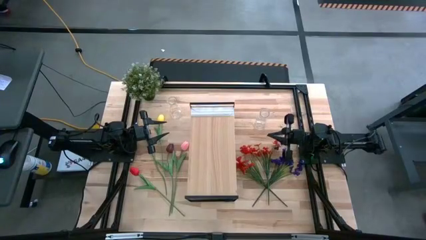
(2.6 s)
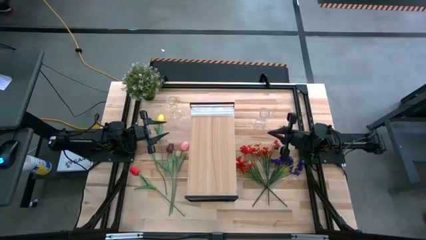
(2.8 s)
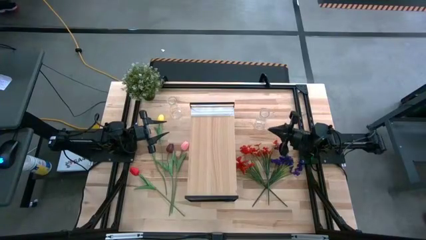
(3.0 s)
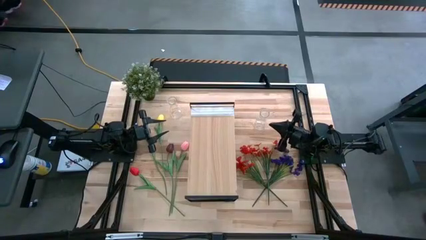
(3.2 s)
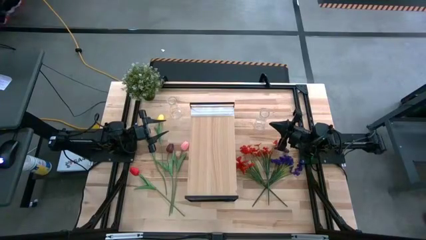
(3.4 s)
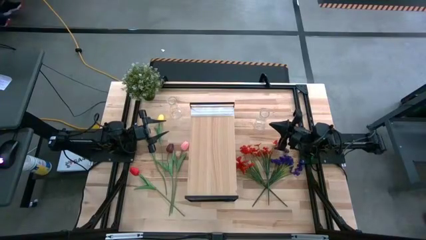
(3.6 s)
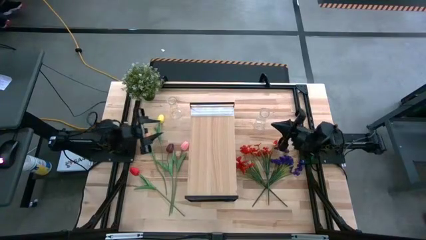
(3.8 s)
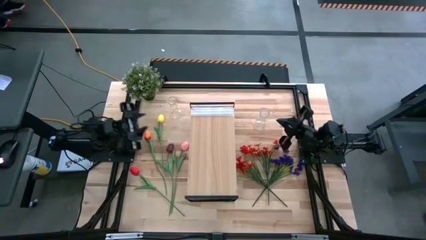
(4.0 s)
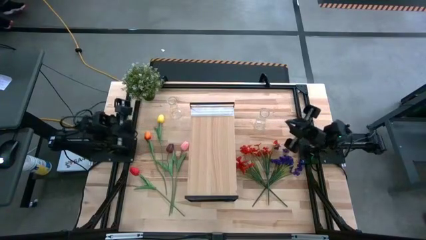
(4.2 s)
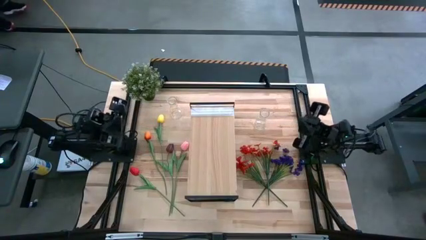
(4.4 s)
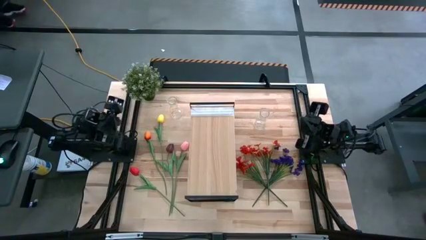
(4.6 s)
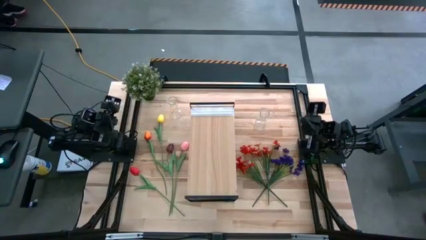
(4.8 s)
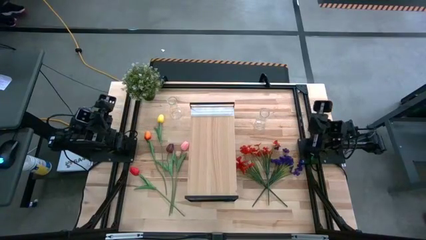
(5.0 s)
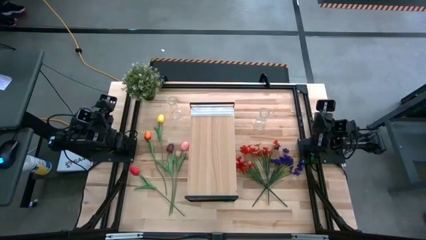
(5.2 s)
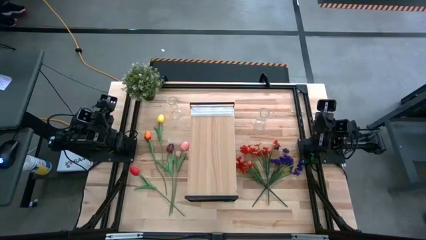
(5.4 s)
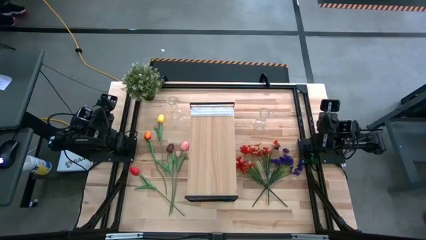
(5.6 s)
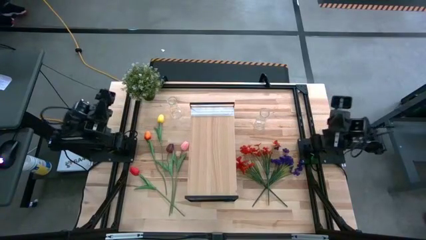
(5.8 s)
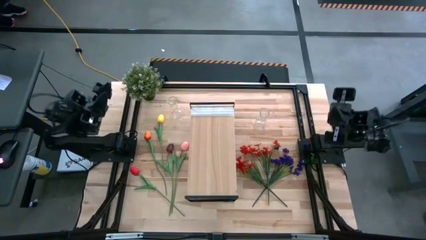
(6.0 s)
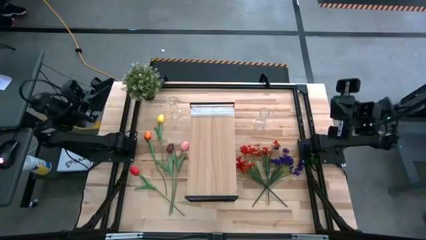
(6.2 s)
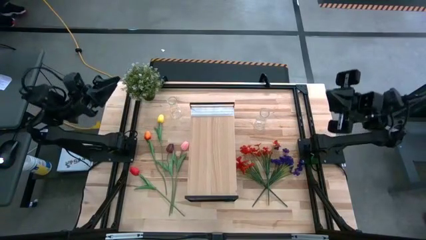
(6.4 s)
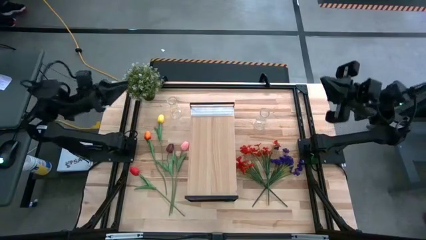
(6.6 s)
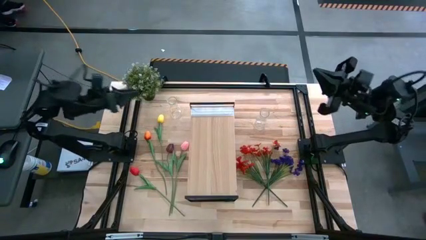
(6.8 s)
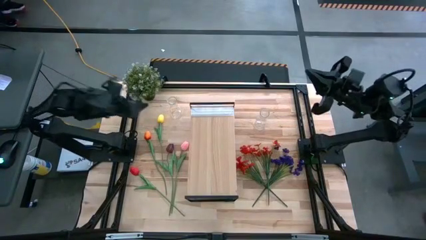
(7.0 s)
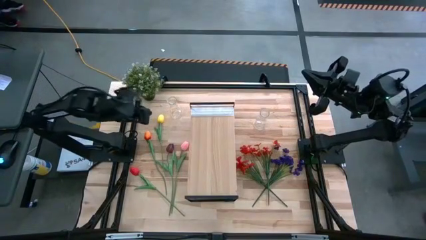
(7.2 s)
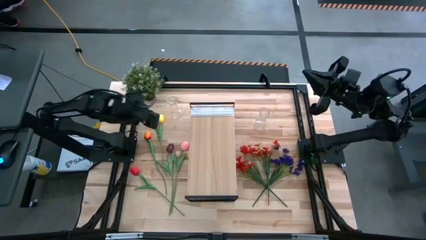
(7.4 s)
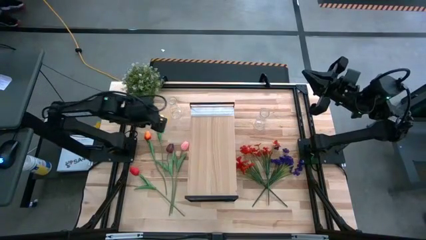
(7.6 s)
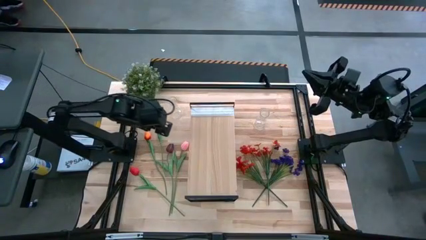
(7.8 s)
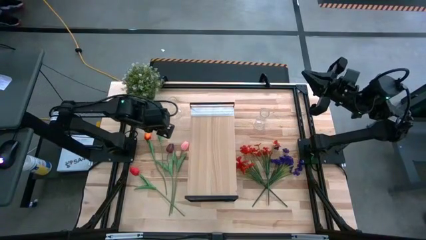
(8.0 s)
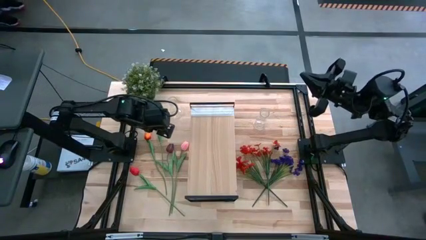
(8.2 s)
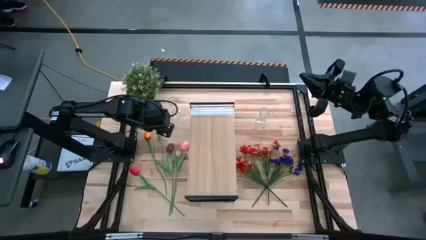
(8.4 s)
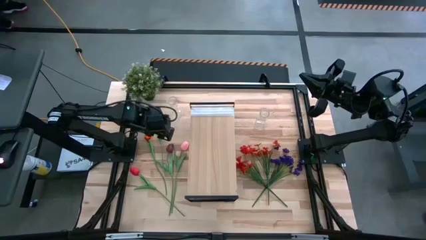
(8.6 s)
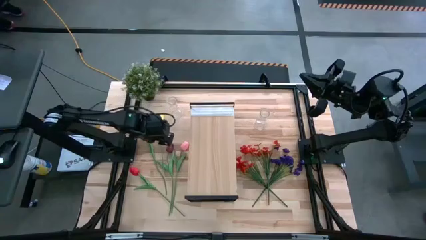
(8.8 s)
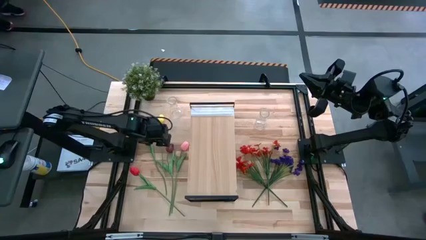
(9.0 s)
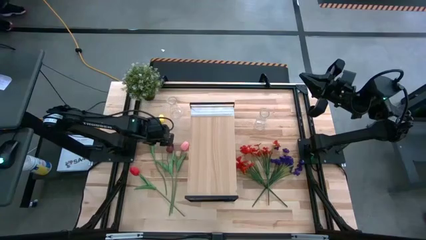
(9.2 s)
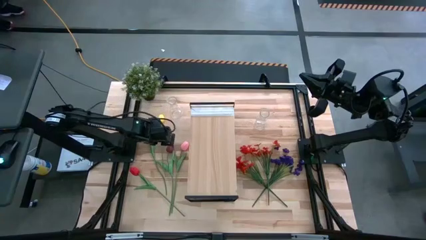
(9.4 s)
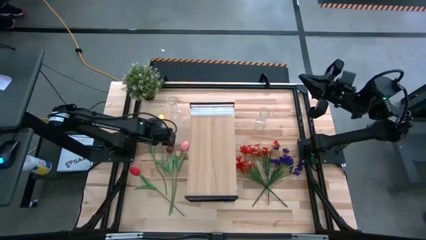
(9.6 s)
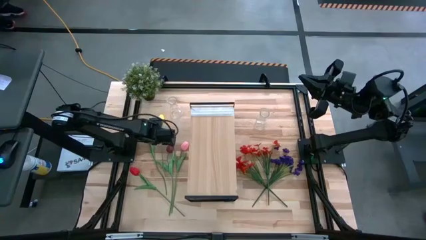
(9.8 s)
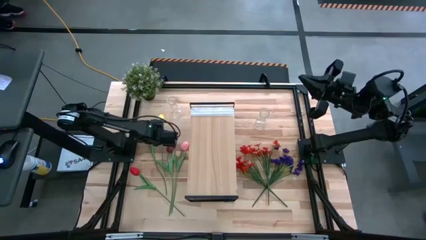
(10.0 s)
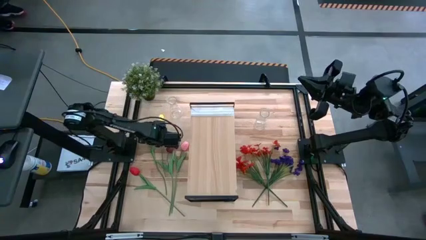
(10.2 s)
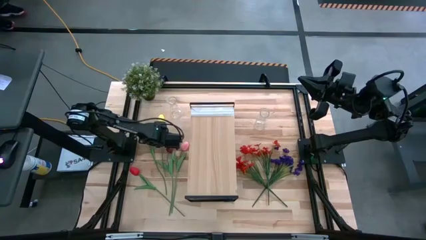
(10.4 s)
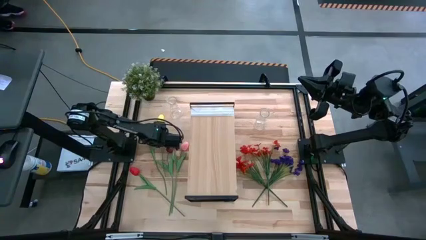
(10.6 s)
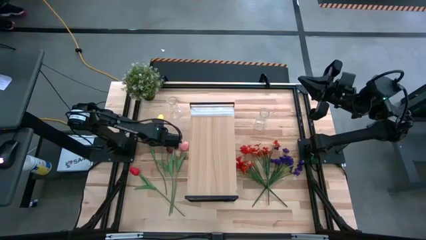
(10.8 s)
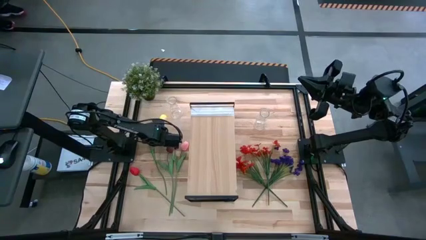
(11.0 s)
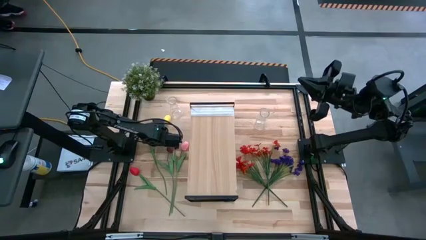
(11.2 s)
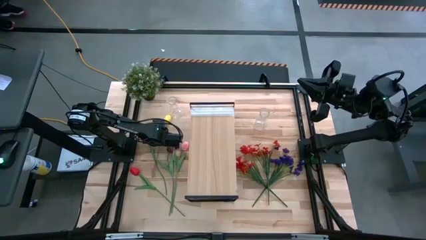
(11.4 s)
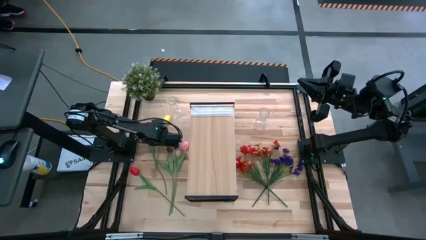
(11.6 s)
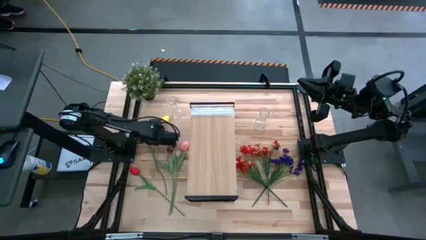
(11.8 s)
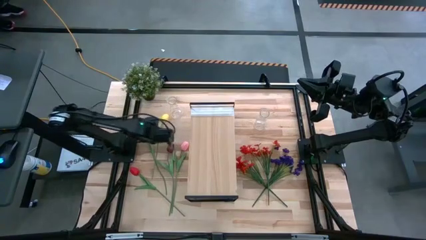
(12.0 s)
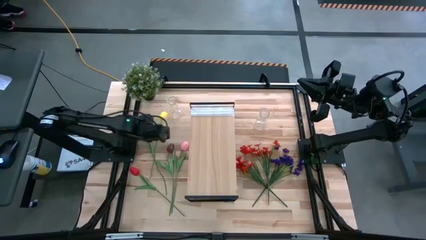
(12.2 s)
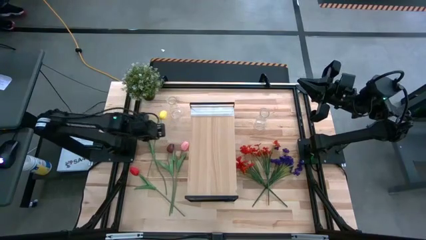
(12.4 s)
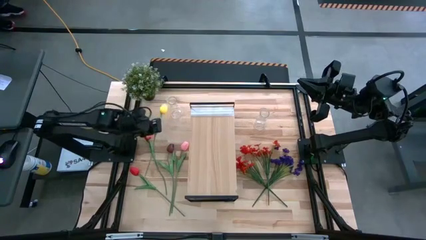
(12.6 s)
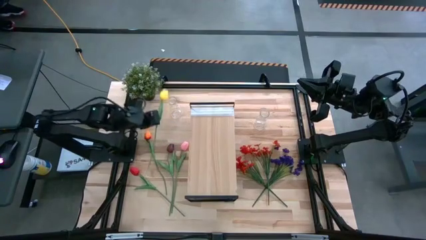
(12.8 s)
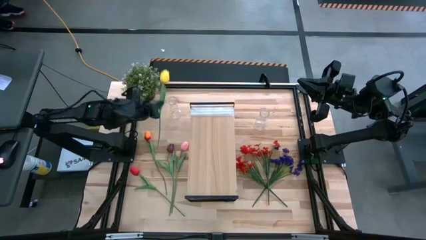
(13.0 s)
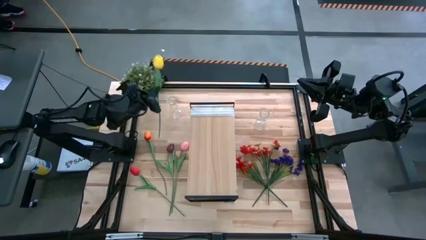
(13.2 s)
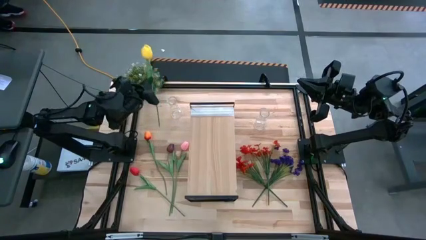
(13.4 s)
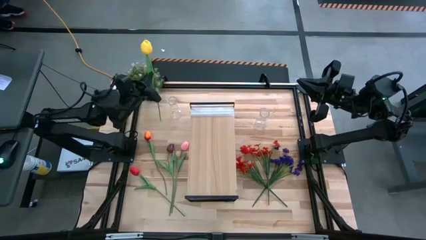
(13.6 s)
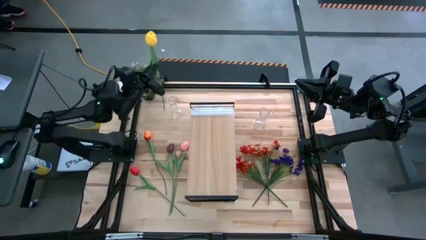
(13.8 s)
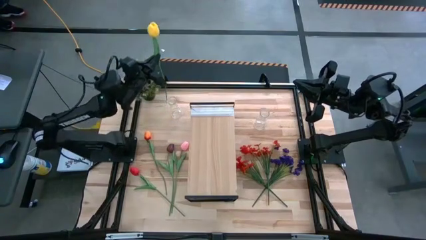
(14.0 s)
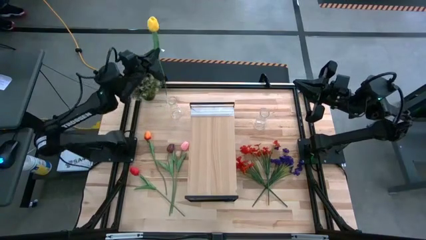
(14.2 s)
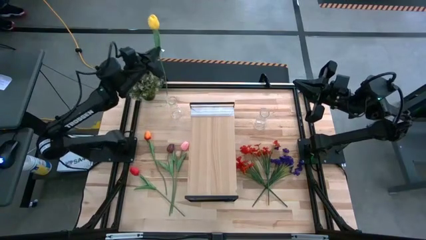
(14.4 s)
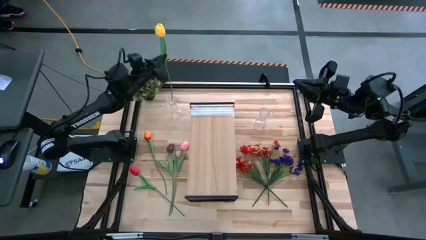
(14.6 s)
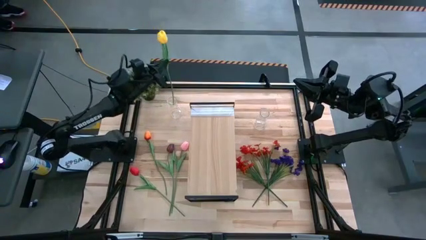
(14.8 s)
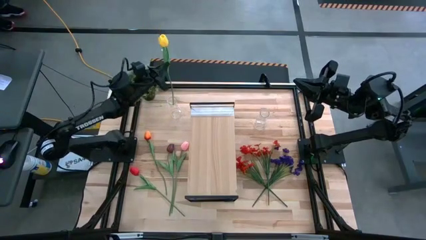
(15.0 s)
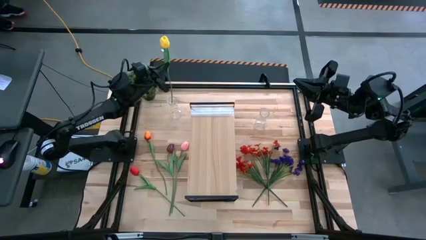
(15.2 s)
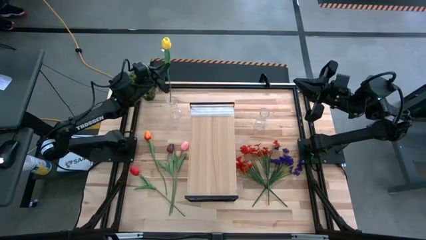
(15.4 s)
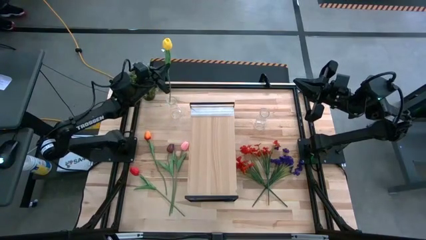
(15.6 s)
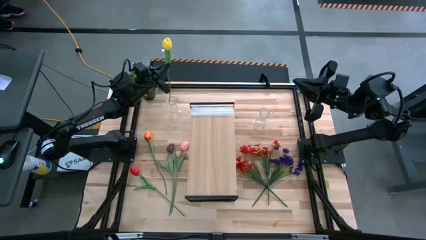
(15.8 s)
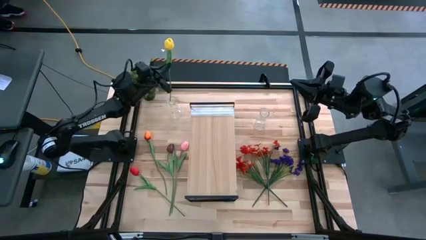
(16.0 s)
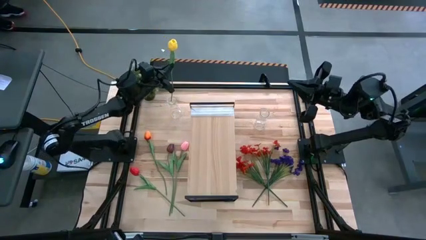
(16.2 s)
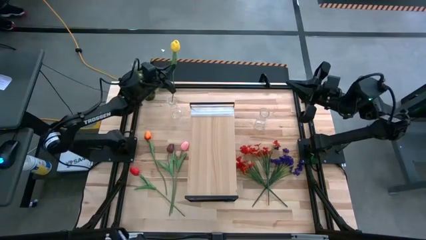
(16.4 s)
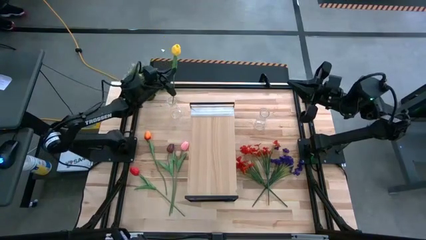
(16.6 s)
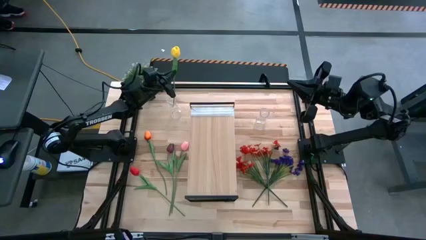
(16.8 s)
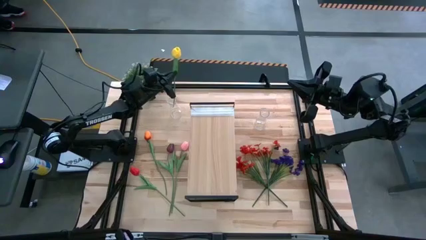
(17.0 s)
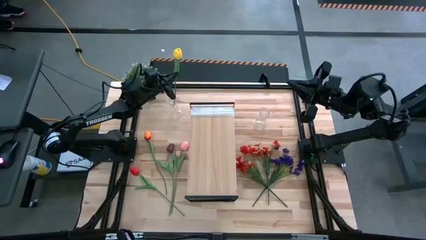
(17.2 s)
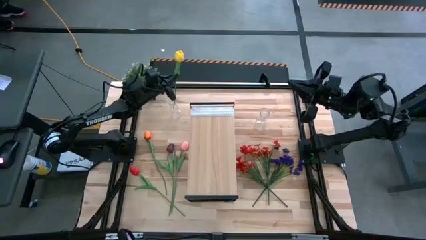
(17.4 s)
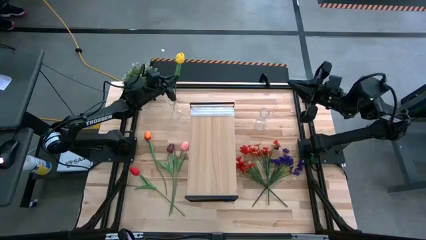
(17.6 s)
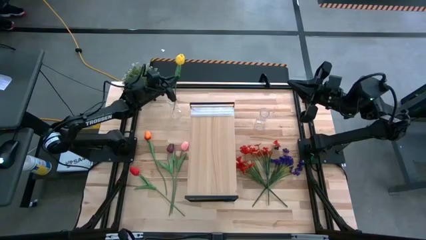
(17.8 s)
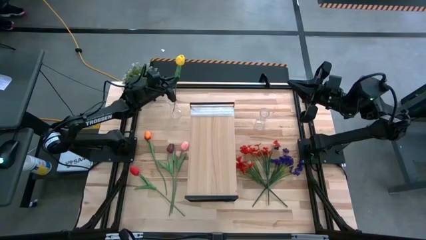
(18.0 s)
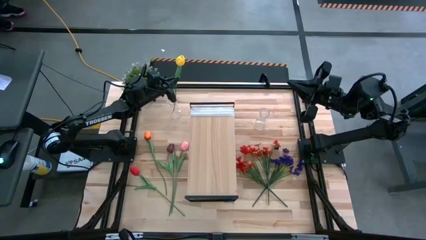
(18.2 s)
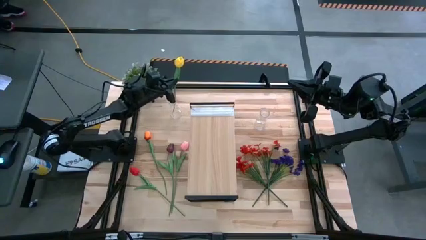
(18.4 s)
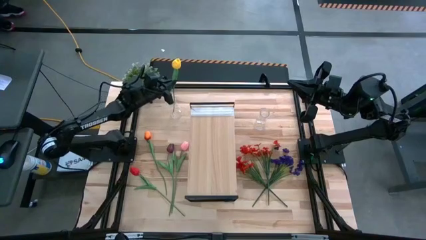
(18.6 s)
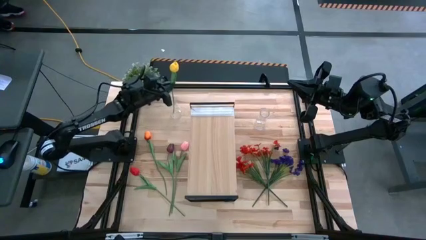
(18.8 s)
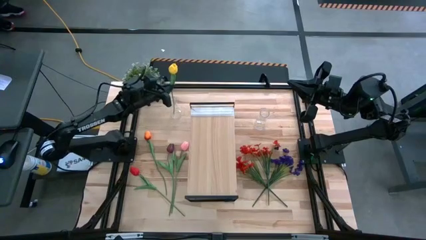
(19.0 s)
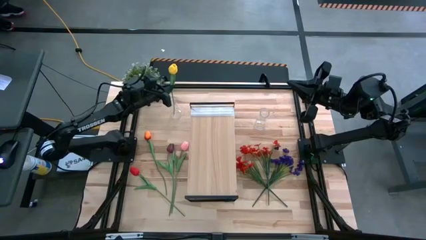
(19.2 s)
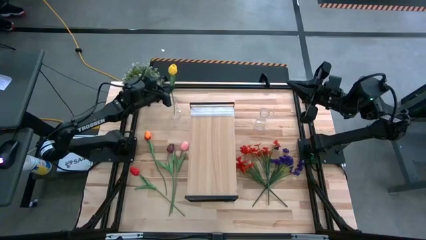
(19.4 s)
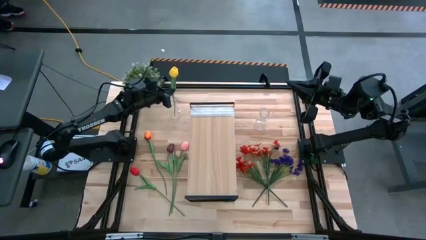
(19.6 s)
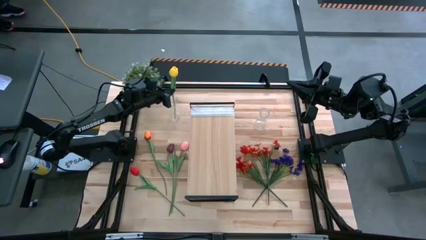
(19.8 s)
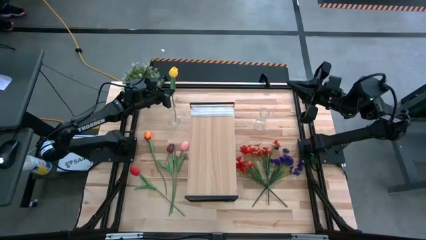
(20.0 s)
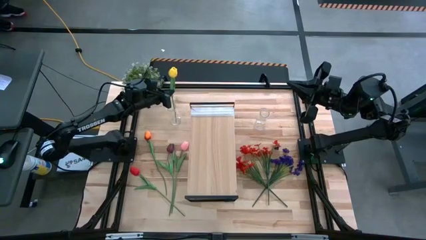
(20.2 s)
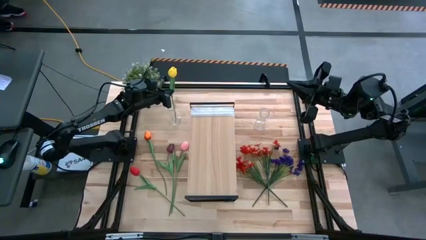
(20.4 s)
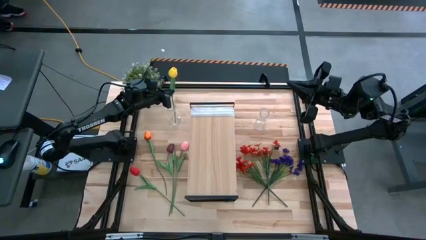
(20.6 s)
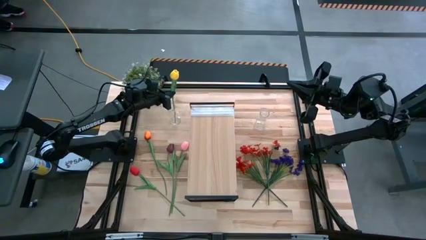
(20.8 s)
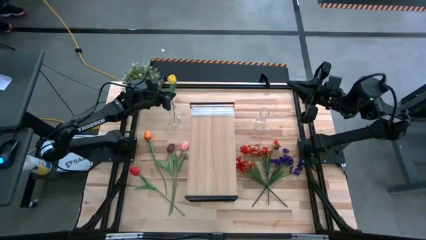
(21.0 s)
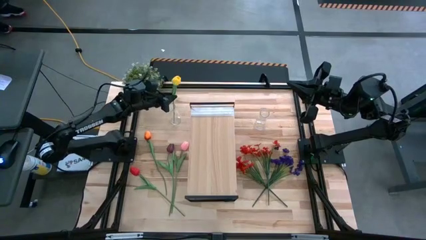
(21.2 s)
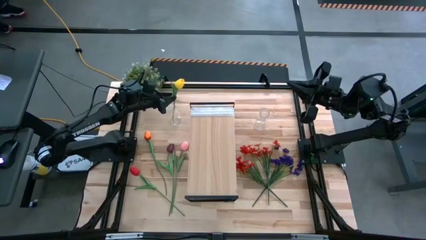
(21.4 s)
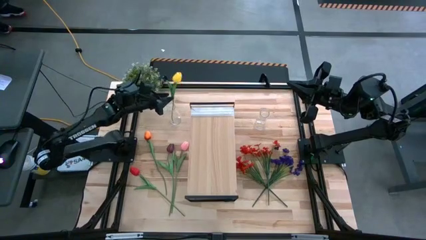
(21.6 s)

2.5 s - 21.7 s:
Task: Pick and place flowers into a vace then onto a shelf
Put the yellow tulip into the left transparent vase
